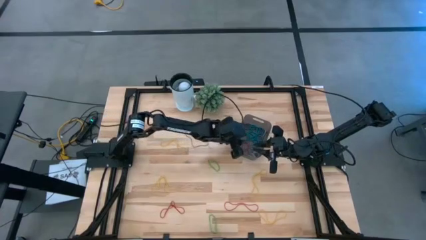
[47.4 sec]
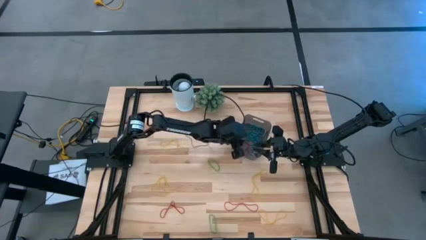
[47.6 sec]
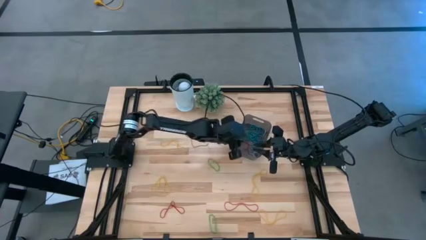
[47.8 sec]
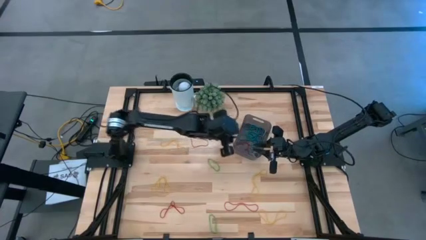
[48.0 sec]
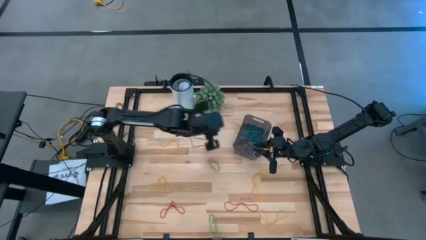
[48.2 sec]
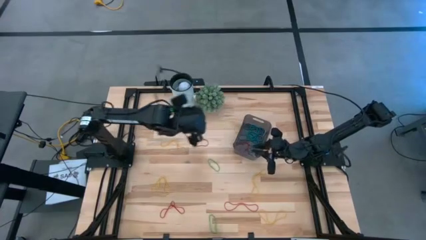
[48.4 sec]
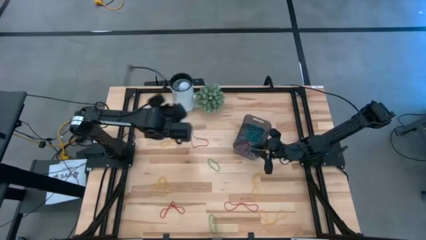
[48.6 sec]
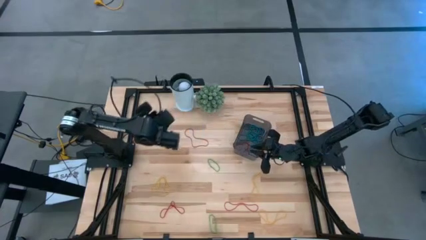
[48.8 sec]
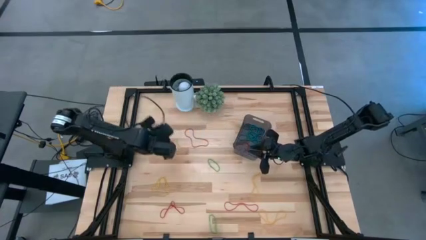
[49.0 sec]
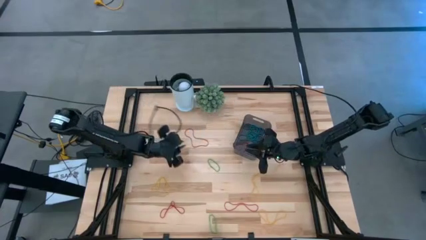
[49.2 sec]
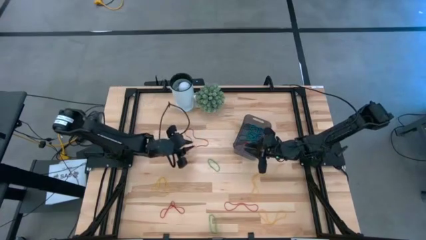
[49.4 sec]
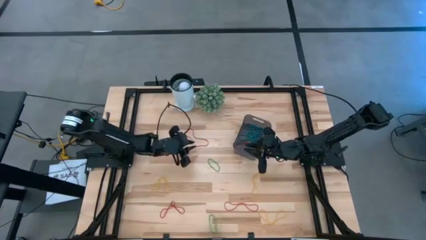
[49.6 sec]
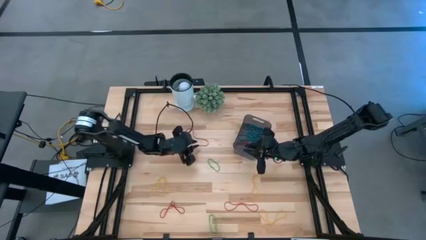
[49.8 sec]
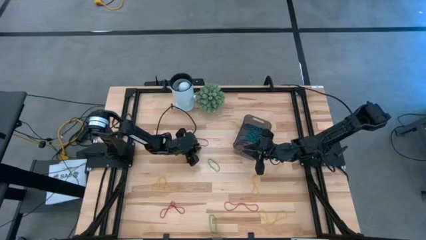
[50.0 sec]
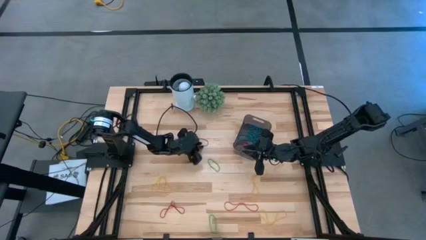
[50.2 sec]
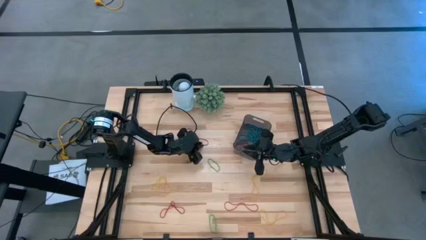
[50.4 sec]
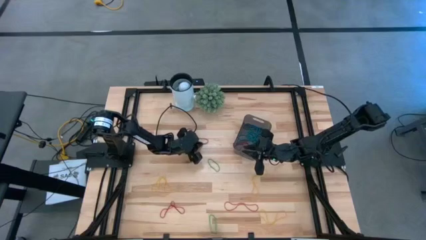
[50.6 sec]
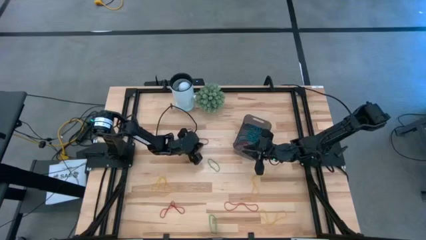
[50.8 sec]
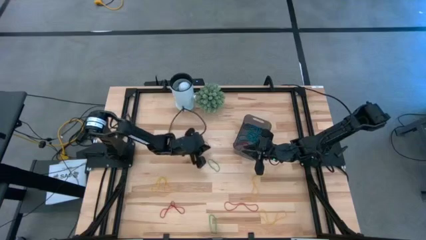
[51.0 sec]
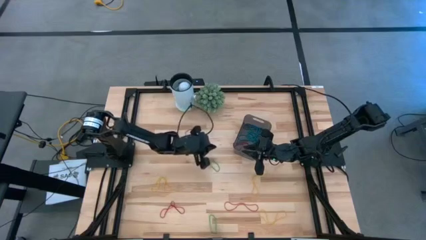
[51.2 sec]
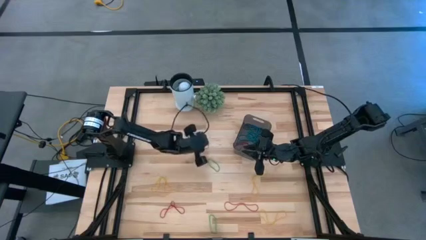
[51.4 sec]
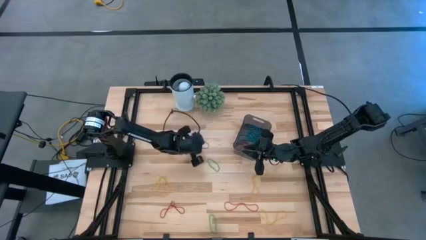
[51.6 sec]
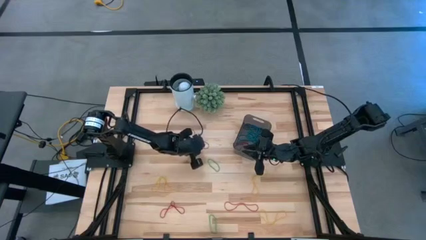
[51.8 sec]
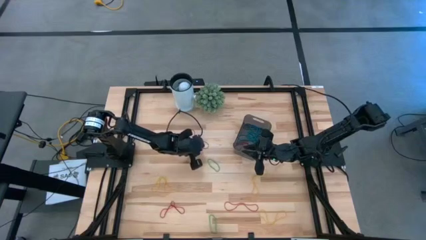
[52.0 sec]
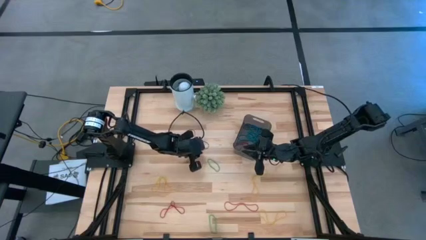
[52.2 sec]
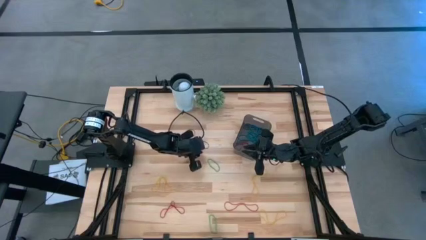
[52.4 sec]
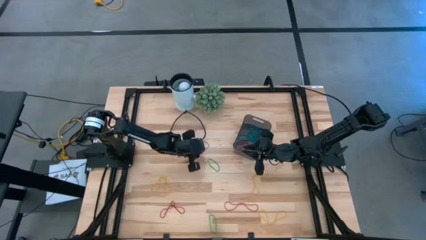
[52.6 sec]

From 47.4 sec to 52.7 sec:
Task: Pick and place items into bin
Put the red rubber band into the black bin

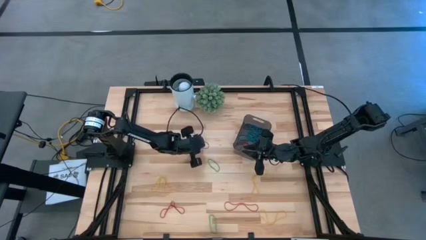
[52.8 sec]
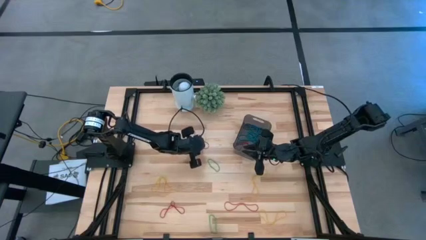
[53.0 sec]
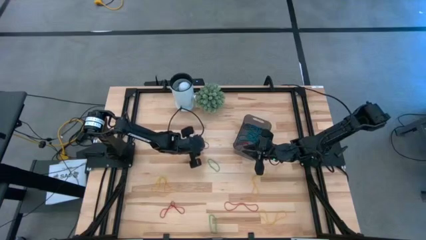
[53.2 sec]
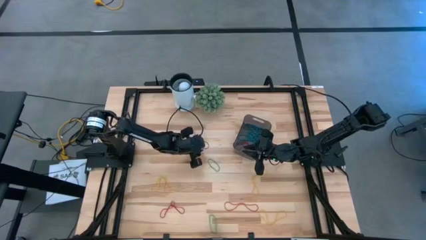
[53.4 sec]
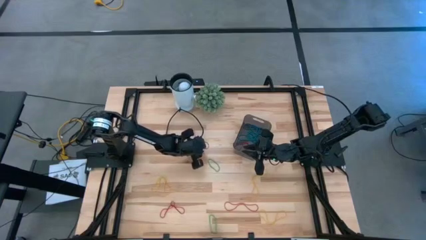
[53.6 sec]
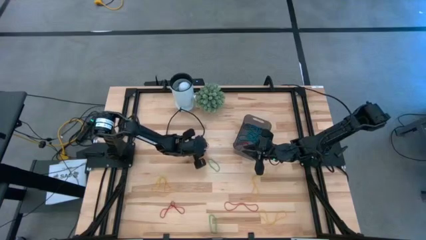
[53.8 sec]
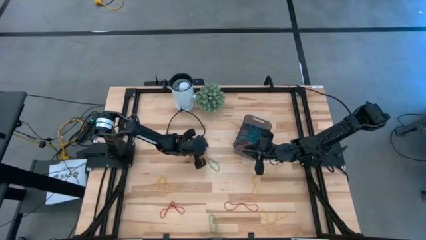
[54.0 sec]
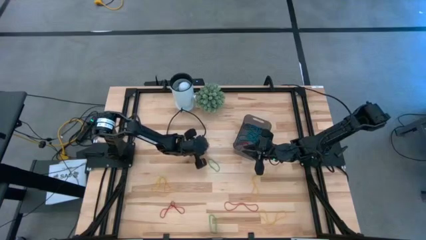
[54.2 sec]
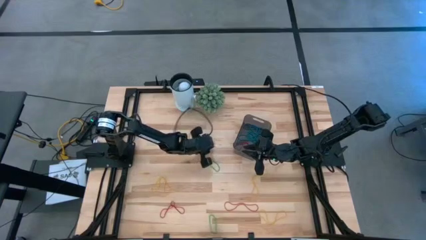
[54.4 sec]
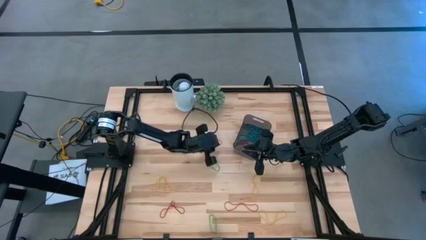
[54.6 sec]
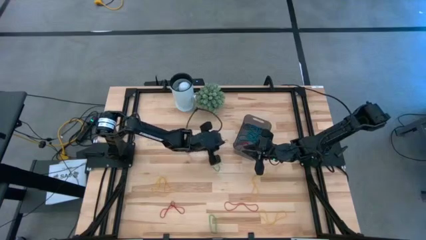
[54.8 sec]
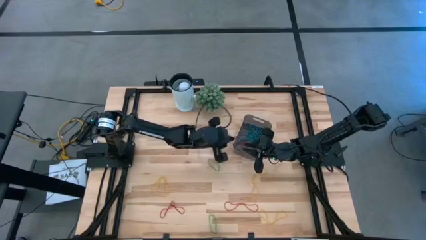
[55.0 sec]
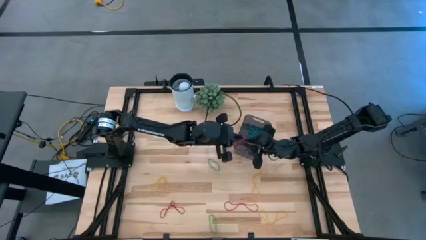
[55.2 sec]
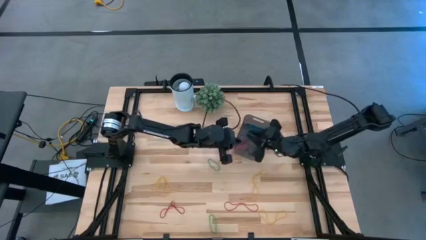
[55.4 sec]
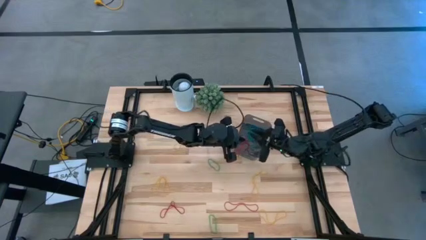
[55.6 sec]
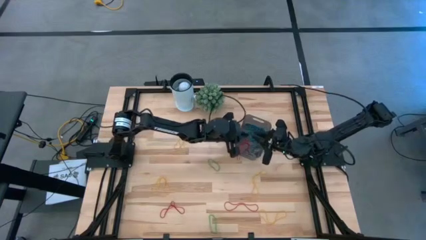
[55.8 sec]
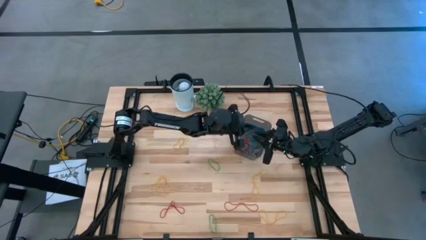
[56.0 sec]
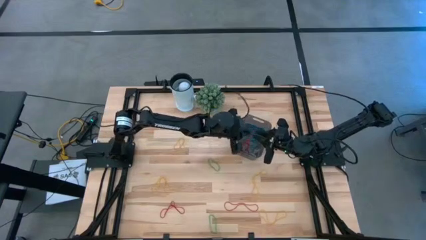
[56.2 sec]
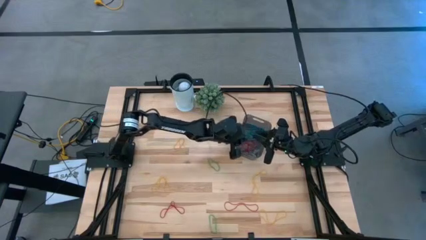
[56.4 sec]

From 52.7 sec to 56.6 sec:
Put the red rubber band into the black bin

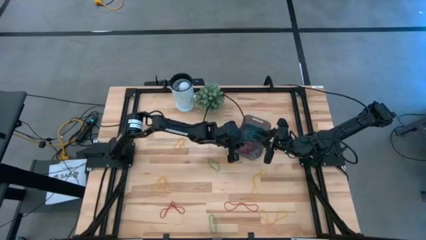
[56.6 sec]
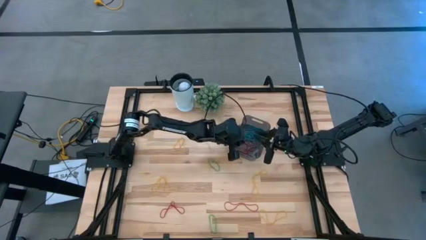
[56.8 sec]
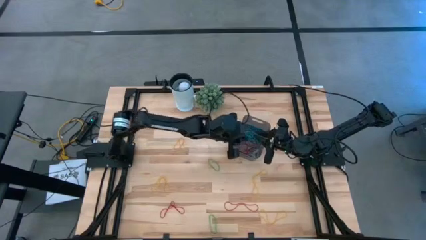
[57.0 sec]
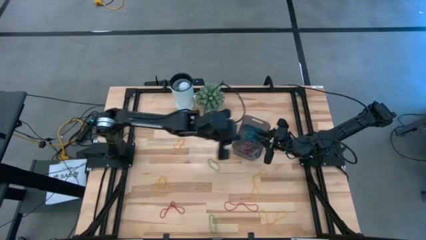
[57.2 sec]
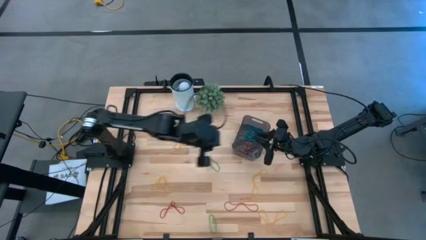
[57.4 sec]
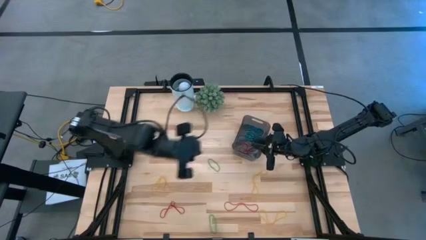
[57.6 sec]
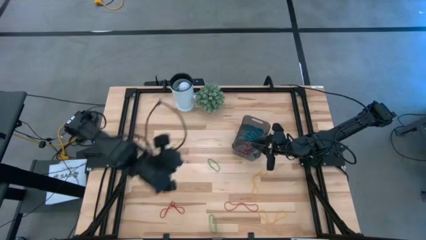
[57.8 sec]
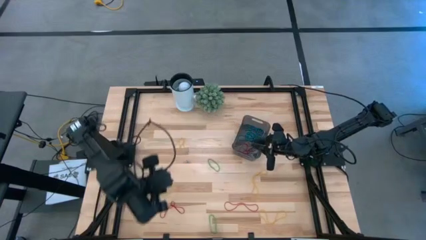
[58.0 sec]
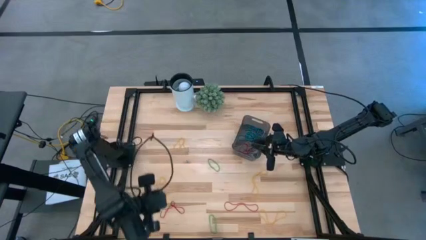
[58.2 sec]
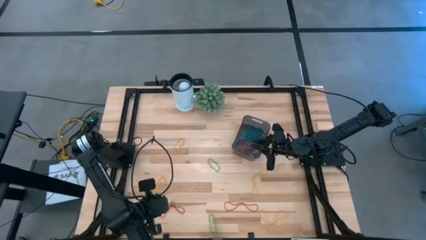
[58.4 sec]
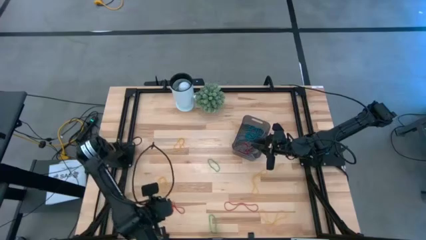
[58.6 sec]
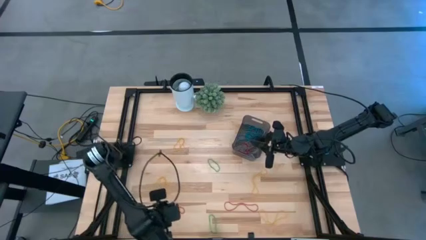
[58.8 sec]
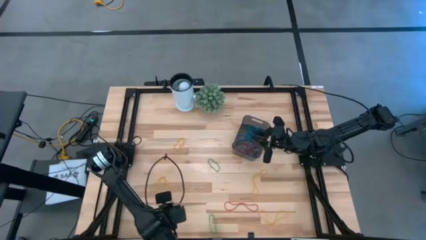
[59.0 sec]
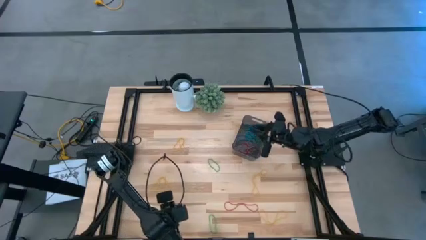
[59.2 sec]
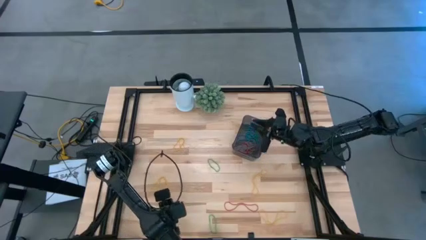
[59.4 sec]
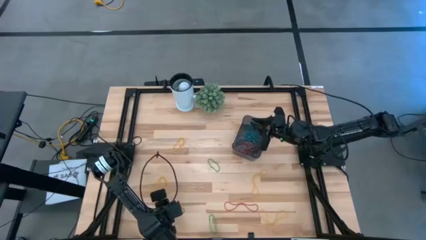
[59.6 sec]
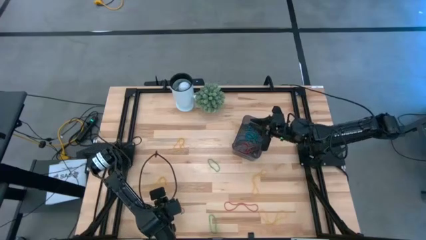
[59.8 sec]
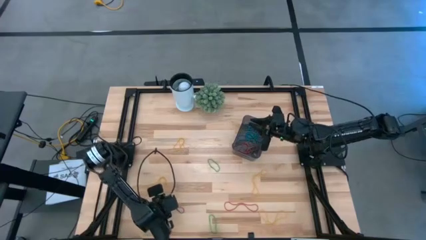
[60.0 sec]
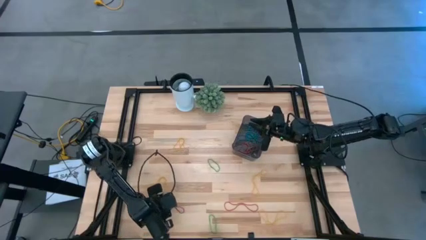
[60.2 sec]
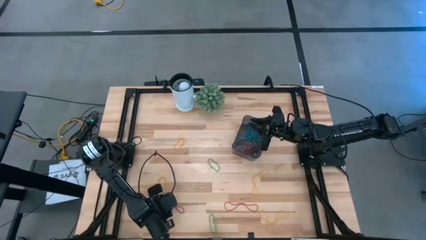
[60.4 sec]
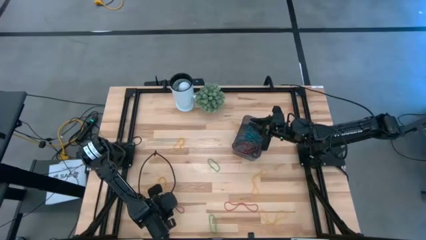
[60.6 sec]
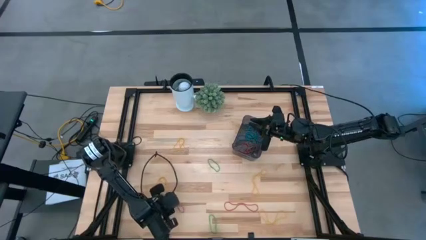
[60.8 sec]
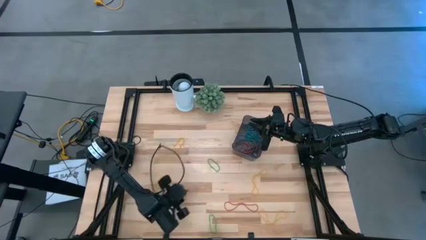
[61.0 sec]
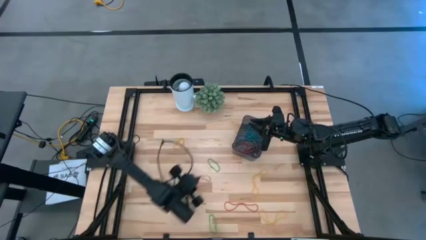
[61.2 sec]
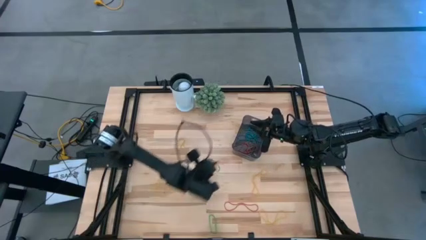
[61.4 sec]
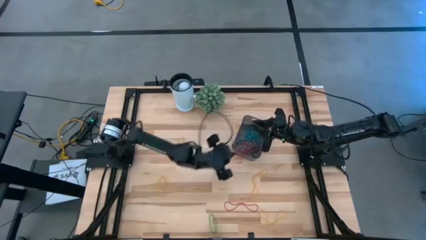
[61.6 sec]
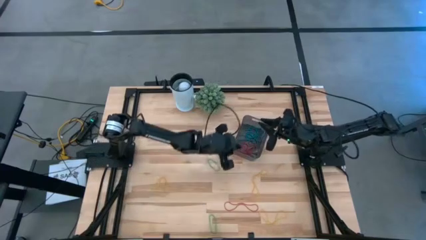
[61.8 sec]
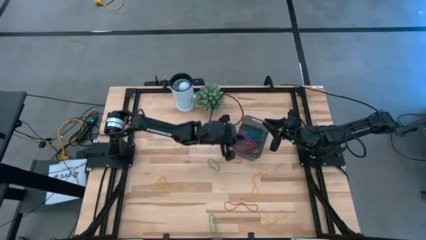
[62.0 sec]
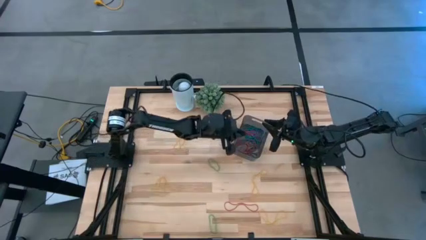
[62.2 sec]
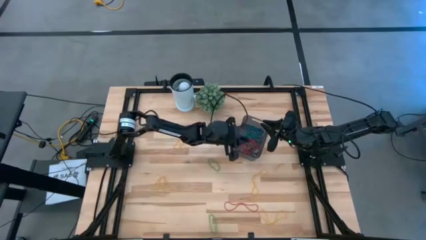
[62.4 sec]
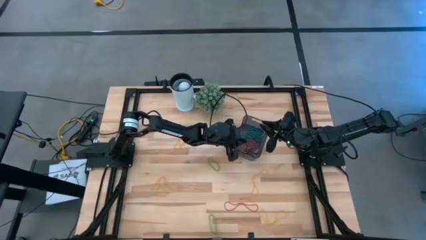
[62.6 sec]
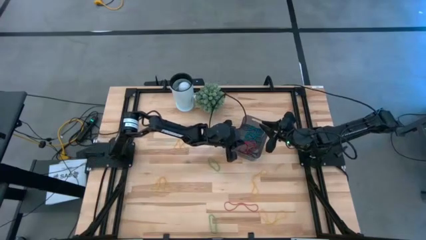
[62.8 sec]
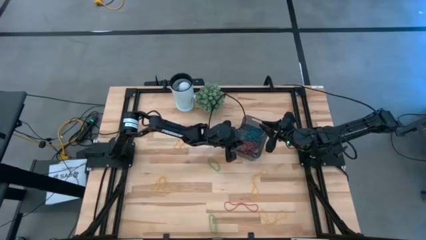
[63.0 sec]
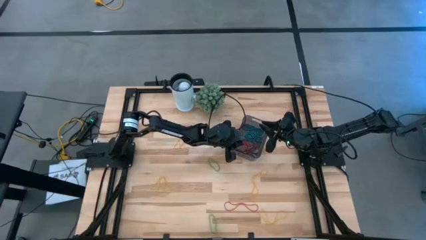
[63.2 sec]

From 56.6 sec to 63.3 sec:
Put the red rubber band into the black bin

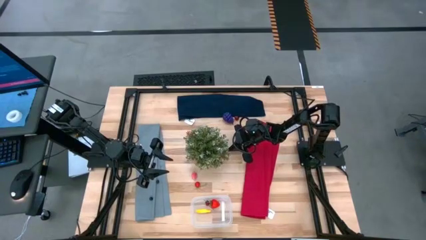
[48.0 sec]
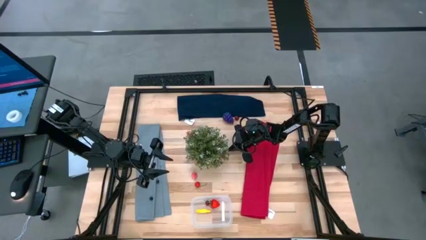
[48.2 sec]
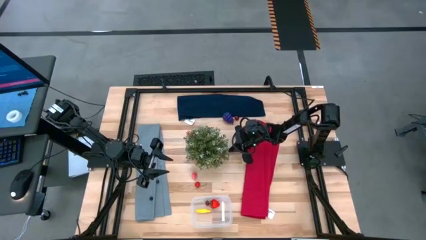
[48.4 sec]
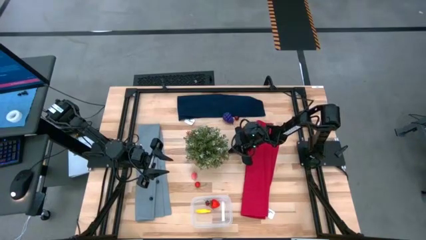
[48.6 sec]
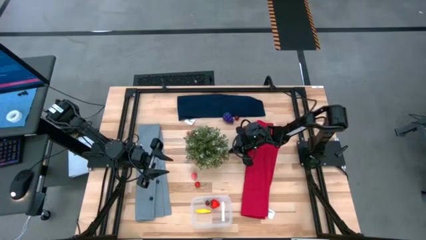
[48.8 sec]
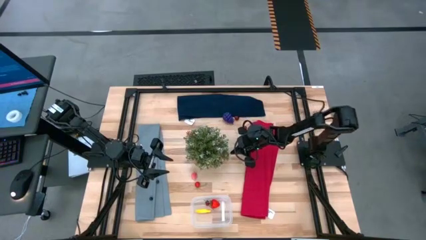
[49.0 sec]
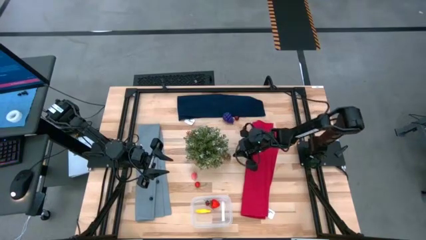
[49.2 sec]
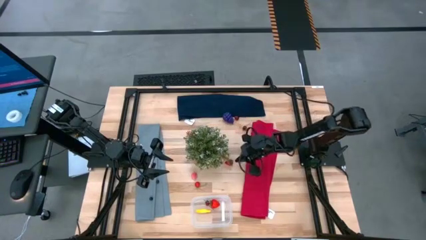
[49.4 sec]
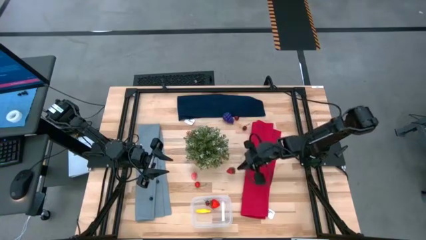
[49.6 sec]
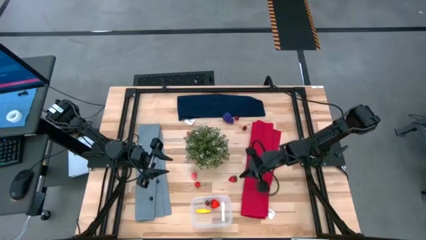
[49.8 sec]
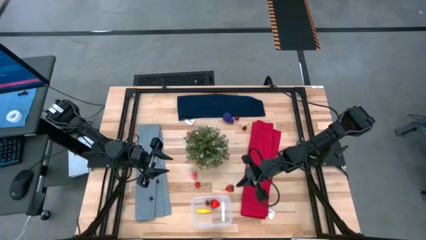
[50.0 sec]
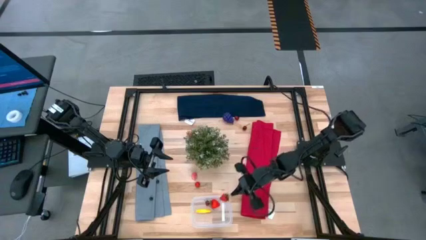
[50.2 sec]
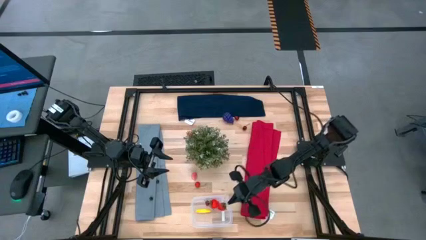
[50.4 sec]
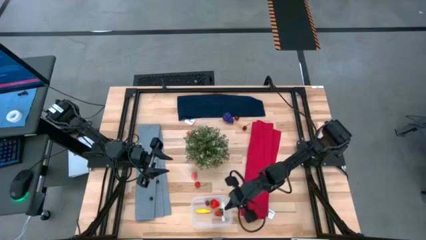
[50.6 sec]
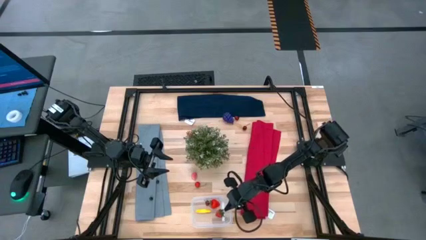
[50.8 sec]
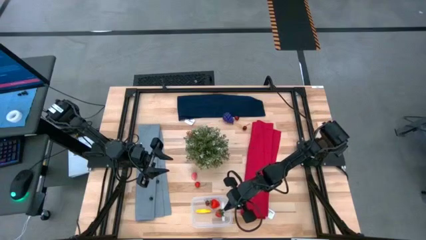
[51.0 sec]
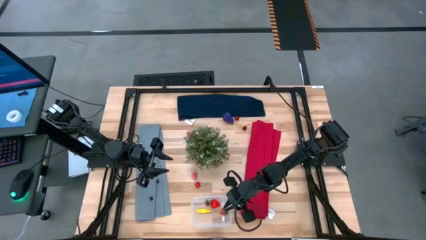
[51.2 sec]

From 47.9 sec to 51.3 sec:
Task: Pick and placing Produce into tupperware
Put the strawberry into the transparent container
